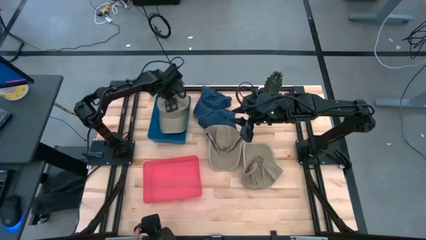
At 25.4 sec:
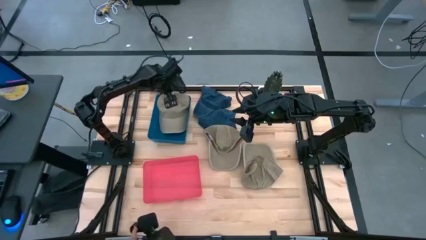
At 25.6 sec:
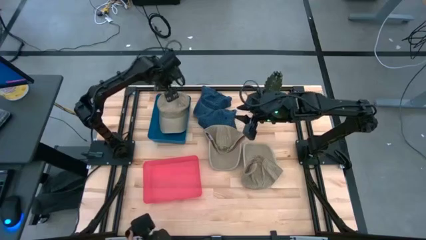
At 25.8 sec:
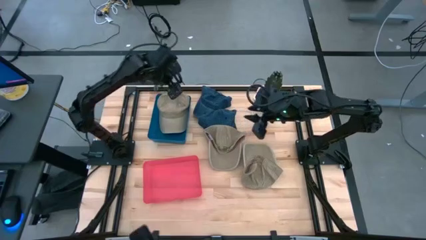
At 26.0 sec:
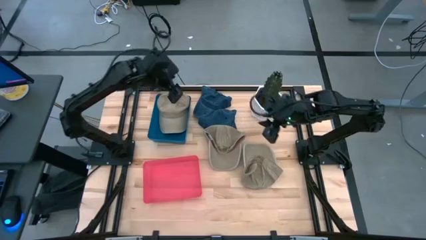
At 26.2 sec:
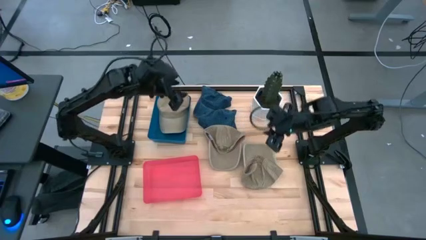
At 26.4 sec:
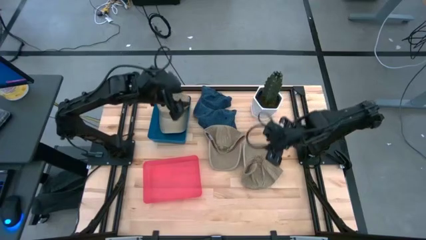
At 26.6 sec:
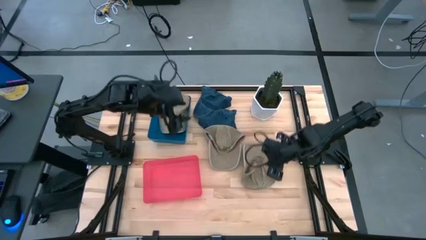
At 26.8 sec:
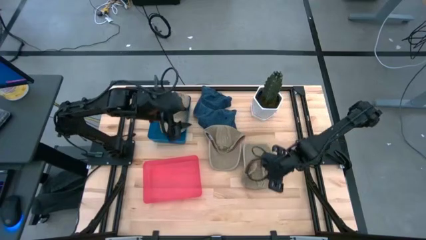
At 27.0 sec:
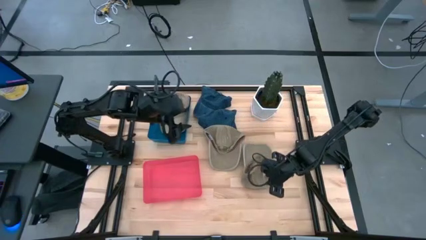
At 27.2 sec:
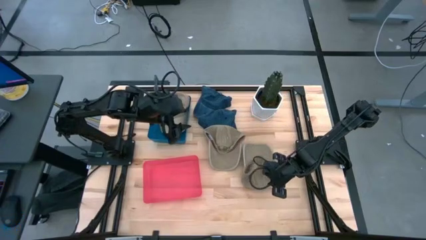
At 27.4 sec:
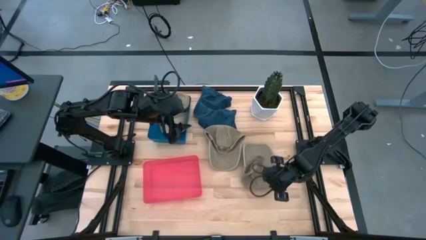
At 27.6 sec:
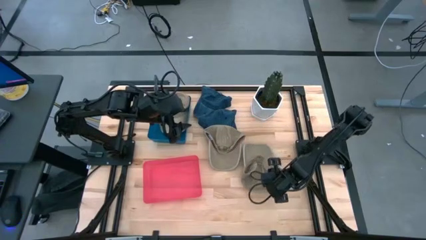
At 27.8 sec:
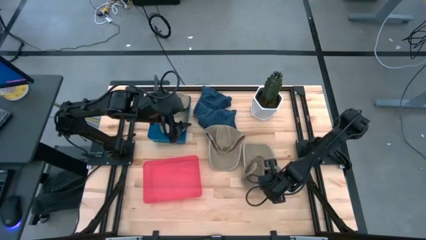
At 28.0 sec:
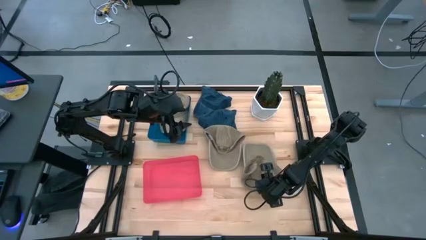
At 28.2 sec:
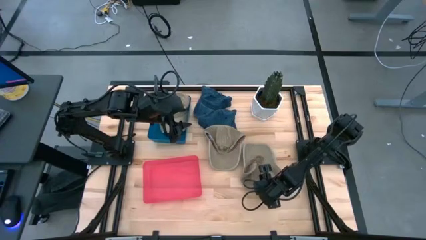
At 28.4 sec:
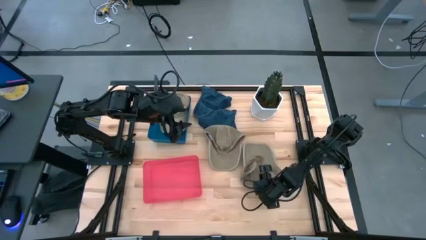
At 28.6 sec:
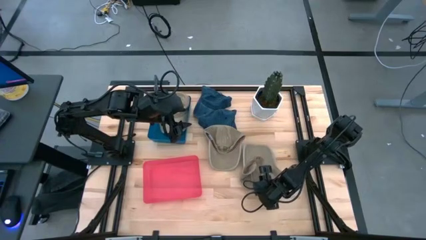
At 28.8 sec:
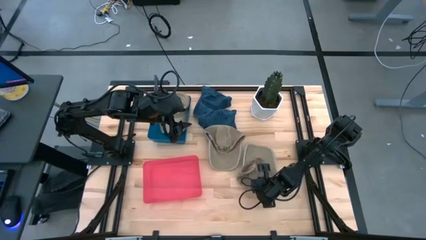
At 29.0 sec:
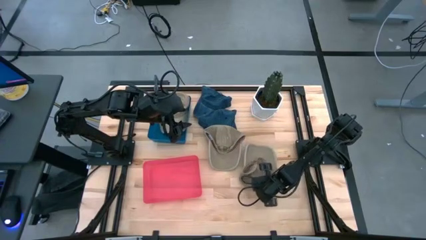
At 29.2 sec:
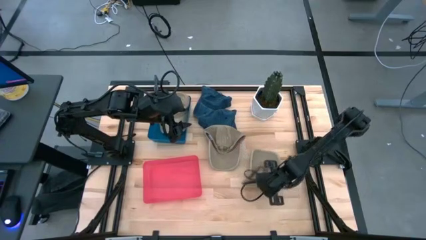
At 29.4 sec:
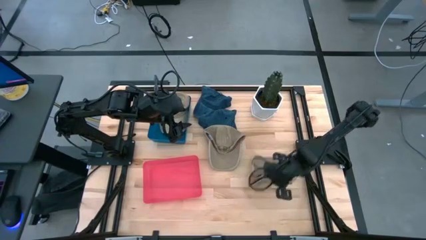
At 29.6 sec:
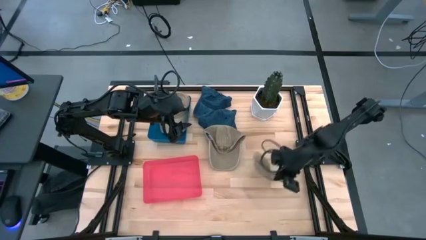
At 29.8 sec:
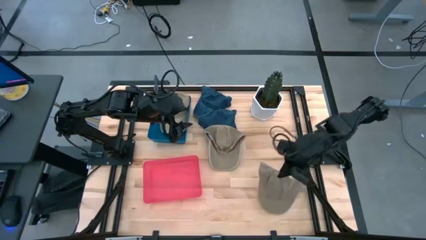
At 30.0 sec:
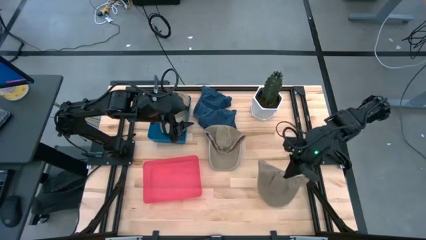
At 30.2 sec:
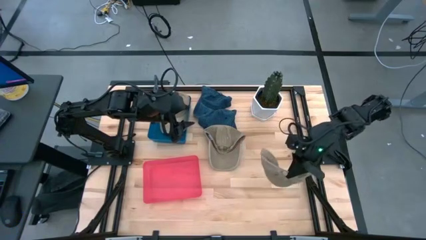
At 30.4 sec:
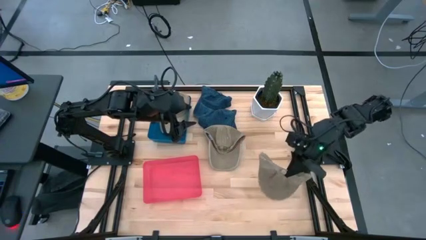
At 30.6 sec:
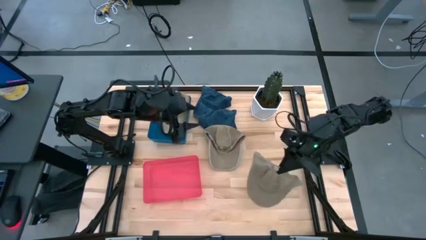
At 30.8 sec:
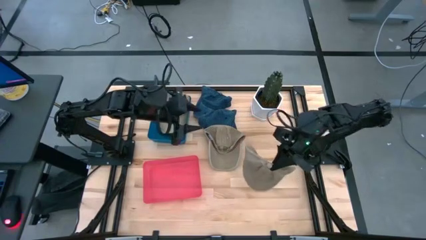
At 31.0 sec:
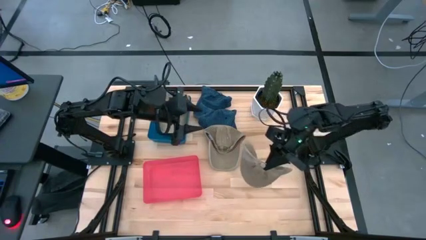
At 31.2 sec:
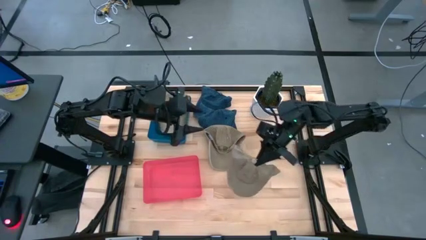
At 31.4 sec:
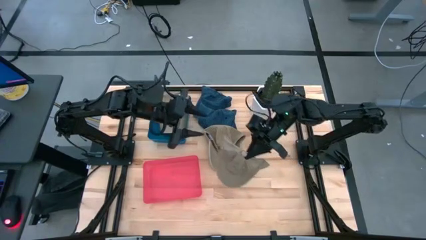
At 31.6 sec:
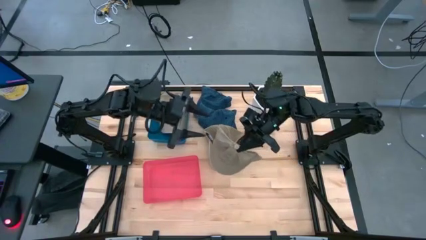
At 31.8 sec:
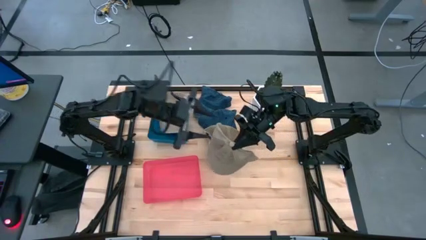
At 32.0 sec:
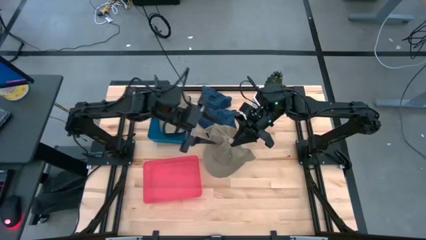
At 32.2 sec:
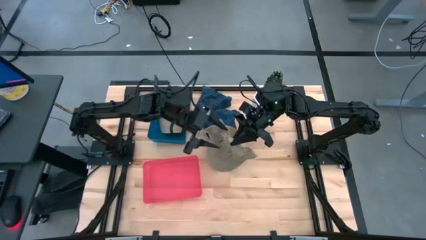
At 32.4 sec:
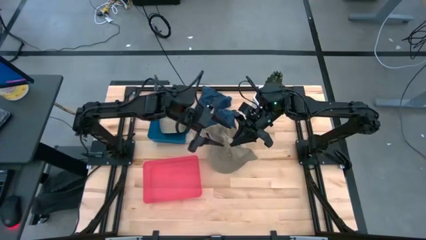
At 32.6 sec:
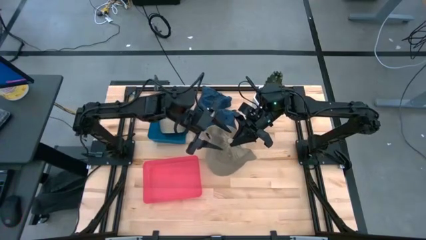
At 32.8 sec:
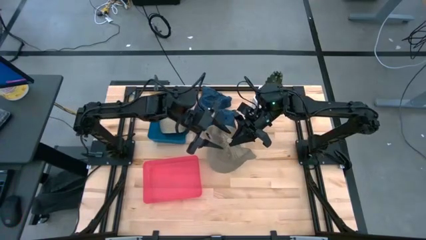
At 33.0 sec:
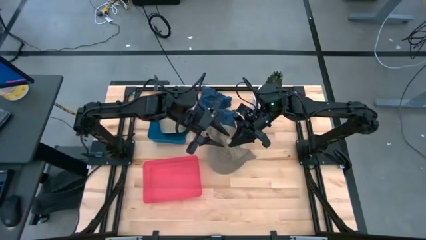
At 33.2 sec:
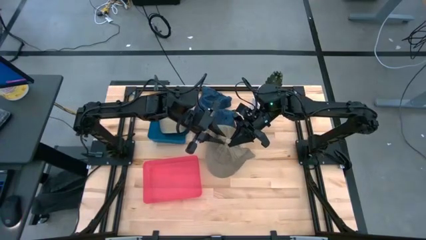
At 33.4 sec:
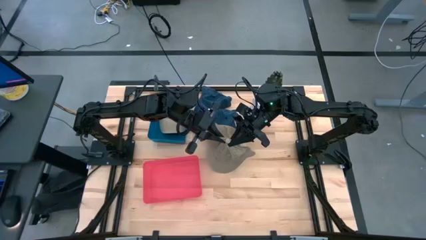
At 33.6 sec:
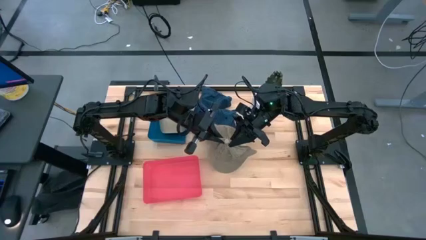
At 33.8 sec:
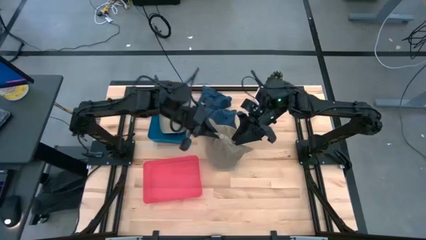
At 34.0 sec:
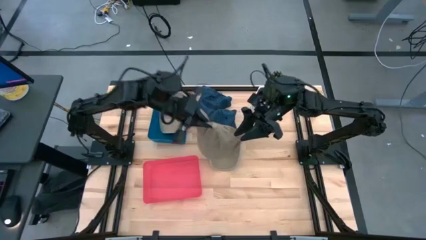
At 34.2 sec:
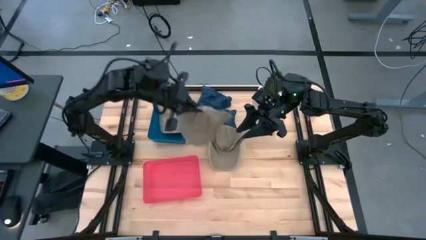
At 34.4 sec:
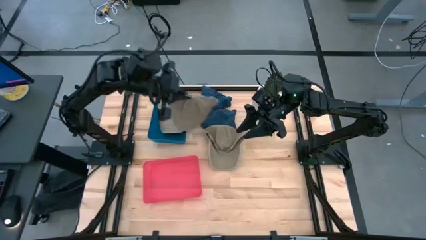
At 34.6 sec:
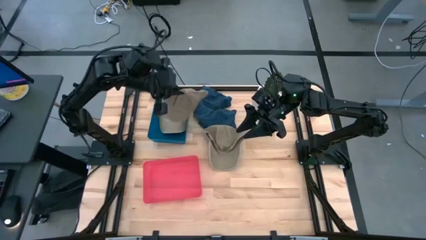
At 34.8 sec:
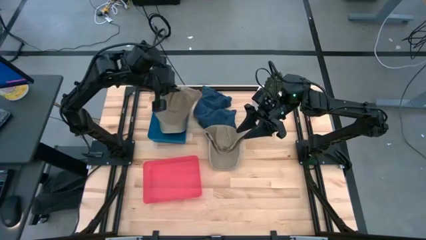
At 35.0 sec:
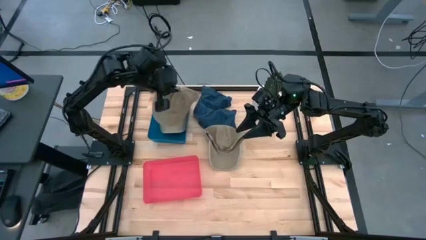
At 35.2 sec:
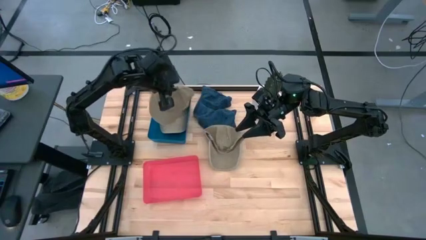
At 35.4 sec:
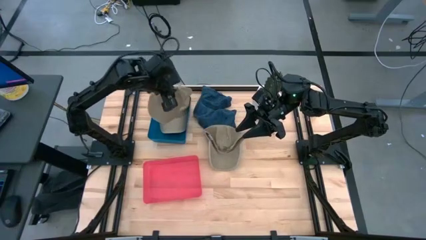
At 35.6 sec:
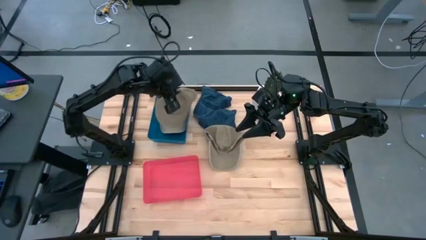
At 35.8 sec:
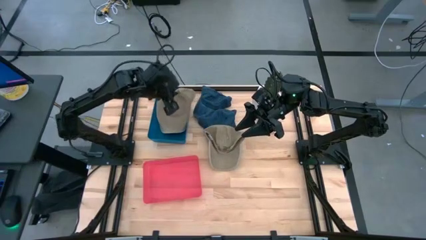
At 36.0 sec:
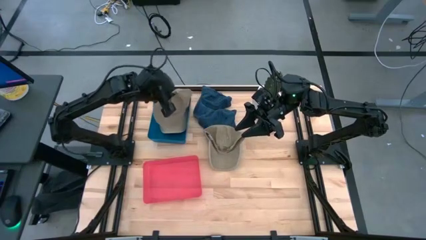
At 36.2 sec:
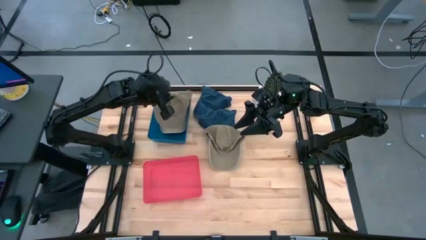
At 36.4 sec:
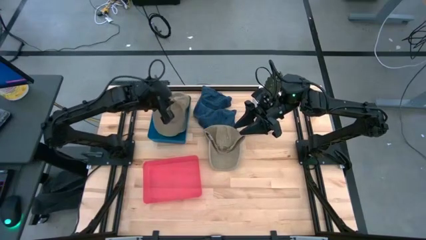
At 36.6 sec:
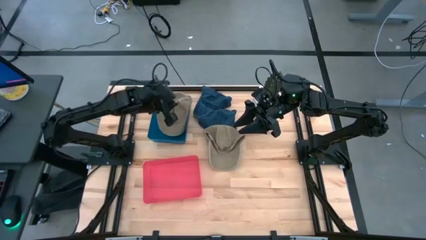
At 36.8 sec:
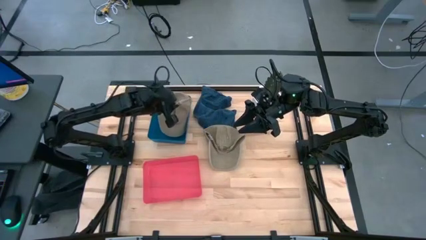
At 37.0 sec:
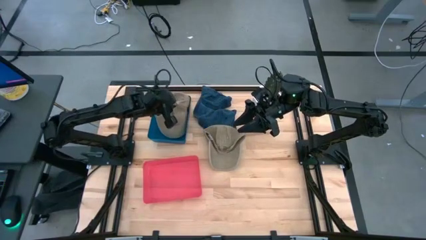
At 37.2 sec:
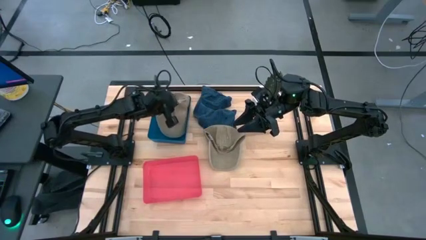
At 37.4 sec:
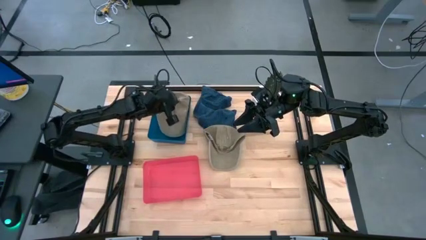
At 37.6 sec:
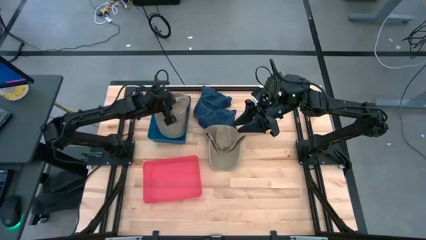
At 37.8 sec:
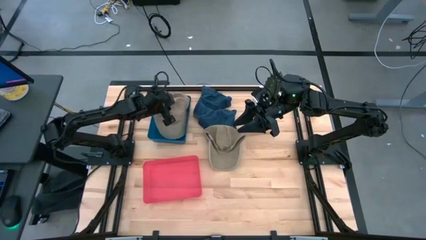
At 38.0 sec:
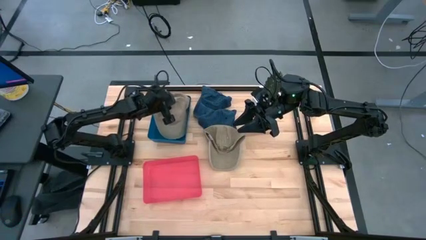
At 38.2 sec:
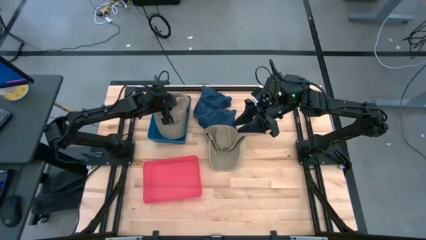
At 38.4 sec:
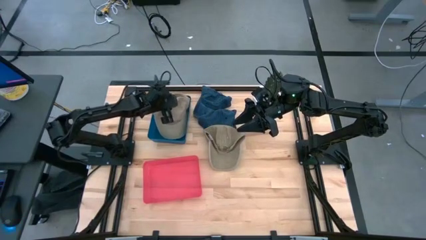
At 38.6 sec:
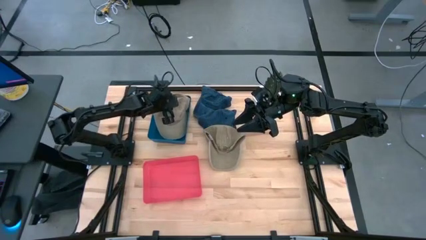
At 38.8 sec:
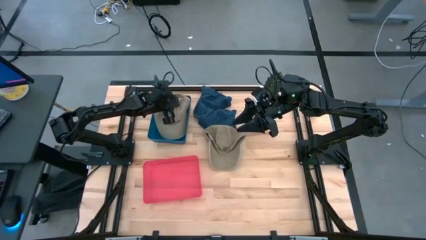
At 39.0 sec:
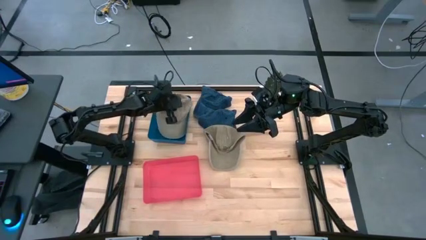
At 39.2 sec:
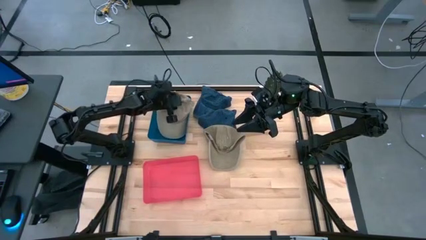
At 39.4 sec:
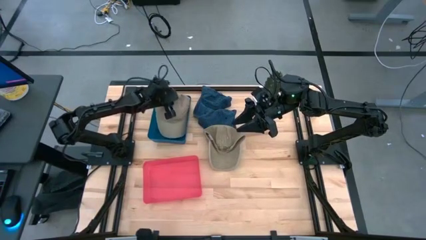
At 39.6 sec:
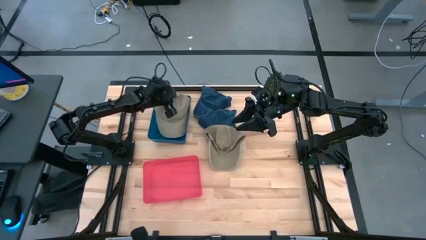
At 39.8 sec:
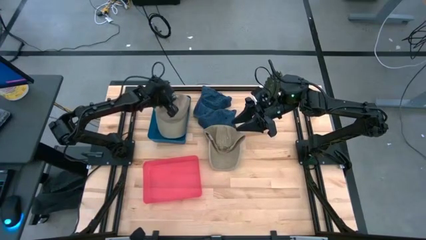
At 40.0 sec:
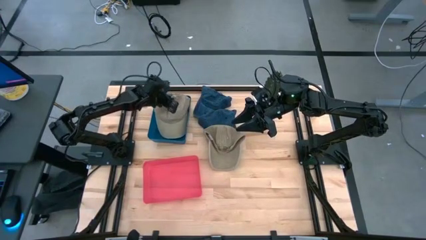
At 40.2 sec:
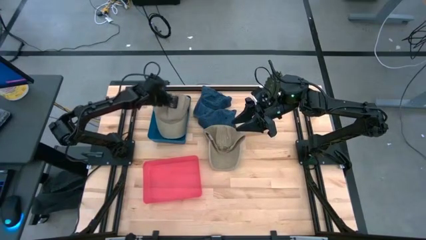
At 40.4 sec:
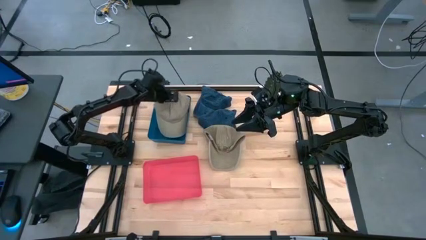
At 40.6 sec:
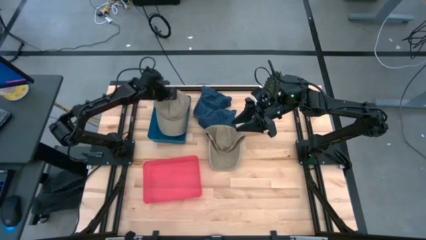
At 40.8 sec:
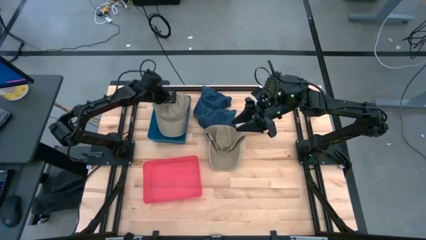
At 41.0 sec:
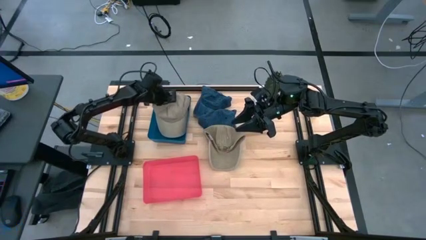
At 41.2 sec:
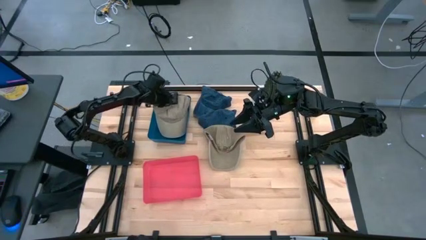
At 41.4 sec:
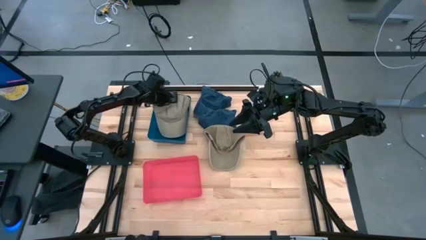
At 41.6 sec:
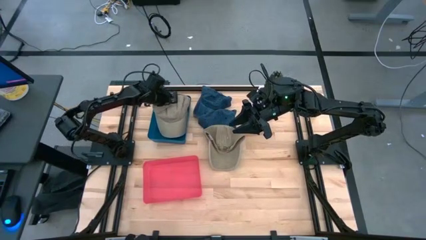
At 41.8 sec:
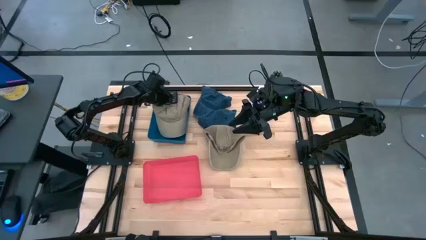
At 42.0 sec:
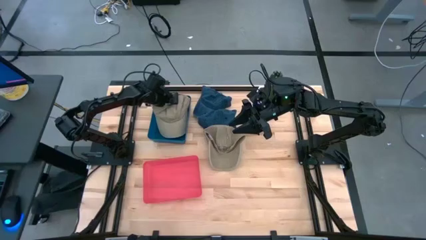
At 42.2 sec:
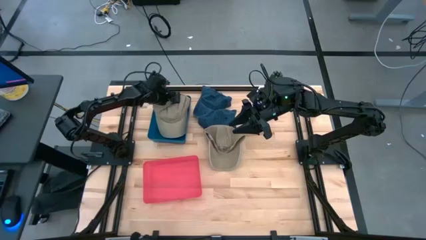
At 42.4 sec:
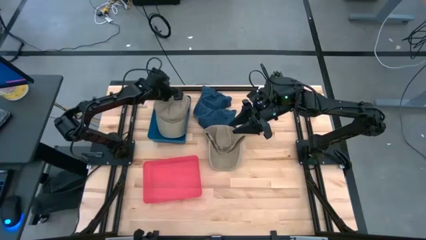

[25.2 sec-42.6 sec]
Task: Pick & Place hat
Put the bottom brown cap into the blue bin
